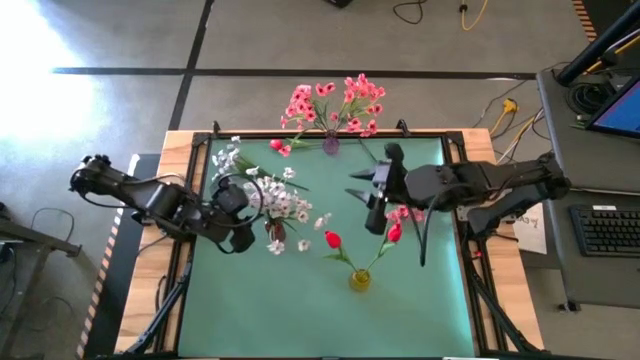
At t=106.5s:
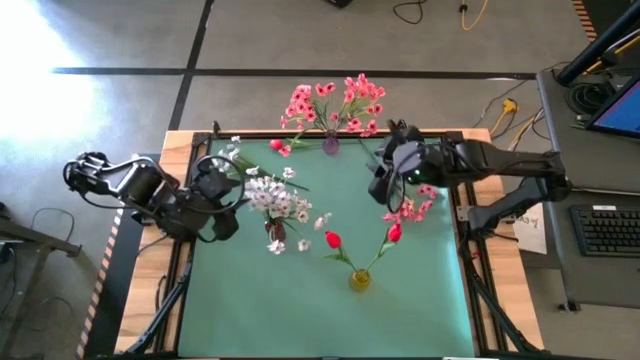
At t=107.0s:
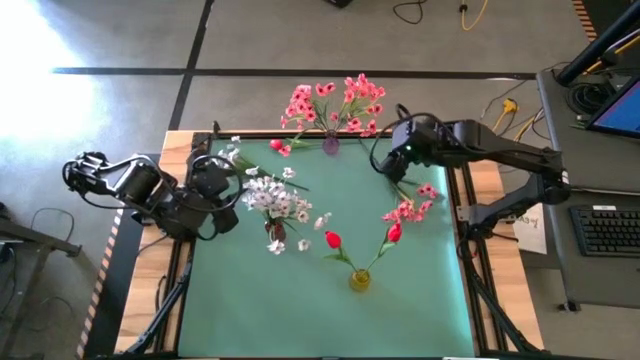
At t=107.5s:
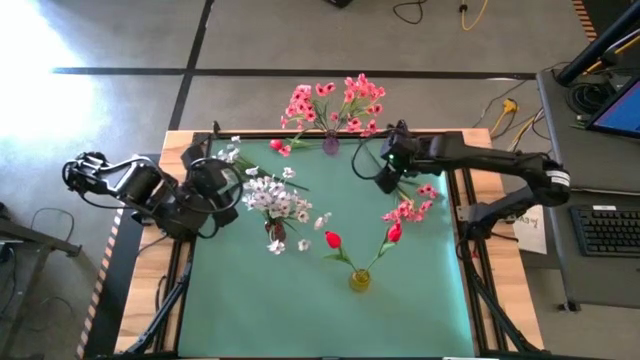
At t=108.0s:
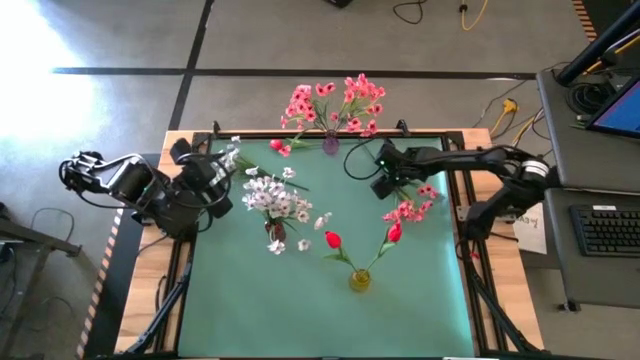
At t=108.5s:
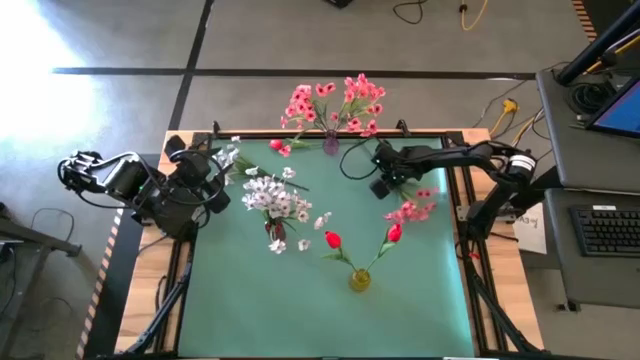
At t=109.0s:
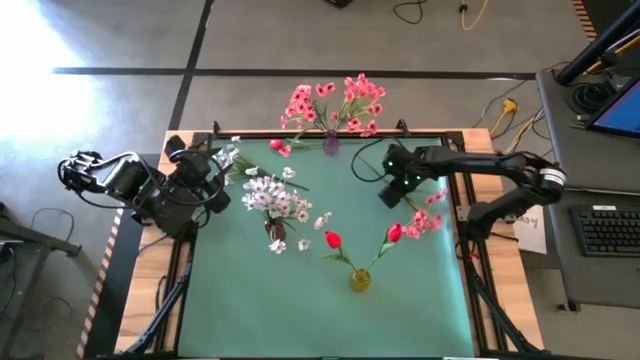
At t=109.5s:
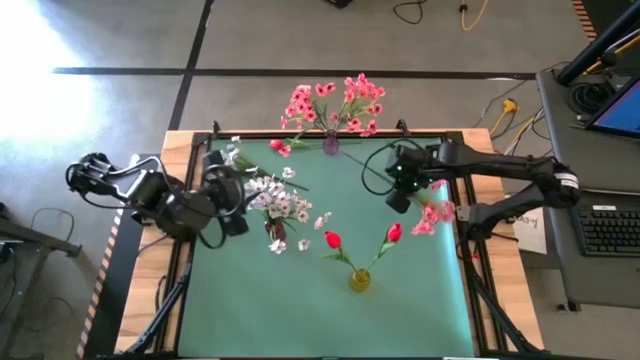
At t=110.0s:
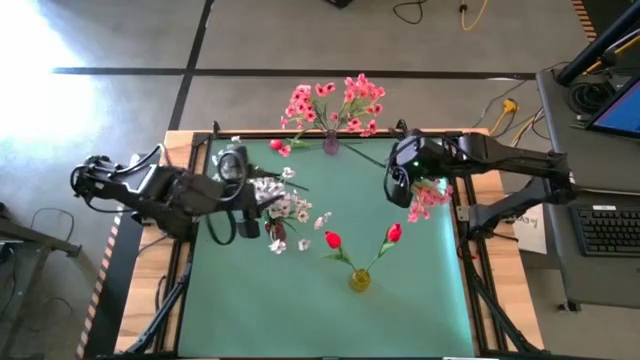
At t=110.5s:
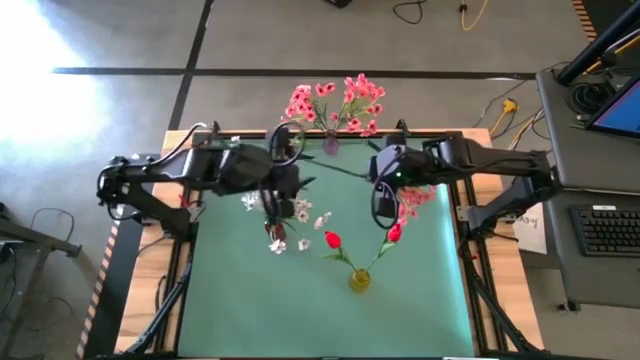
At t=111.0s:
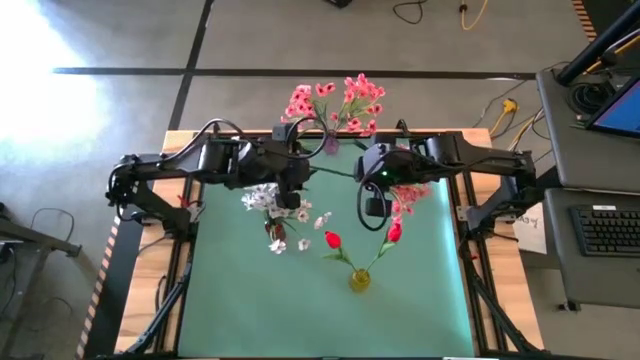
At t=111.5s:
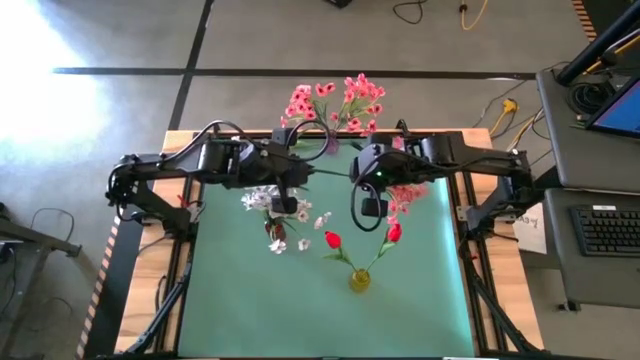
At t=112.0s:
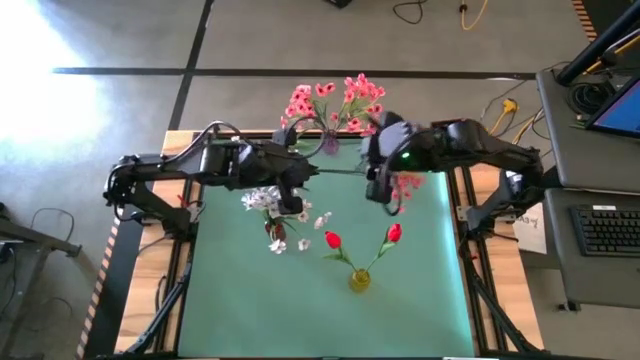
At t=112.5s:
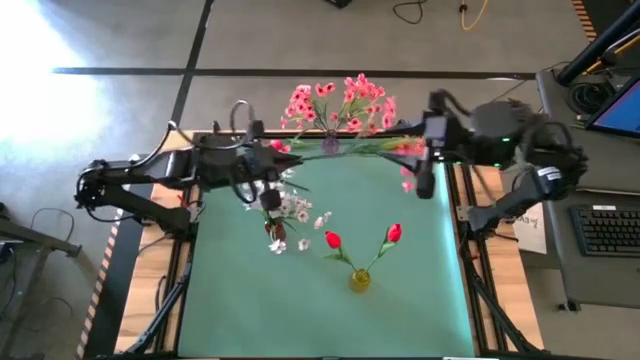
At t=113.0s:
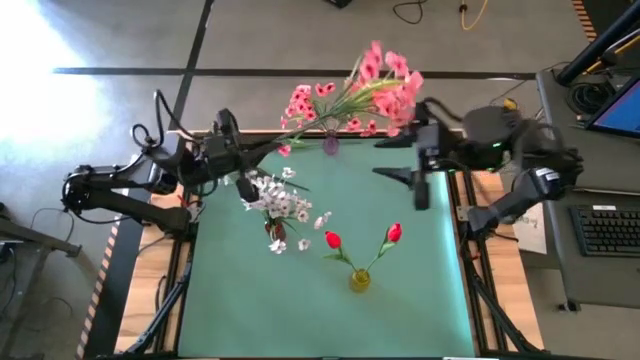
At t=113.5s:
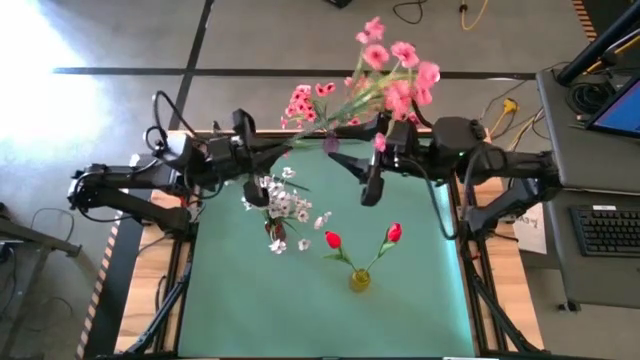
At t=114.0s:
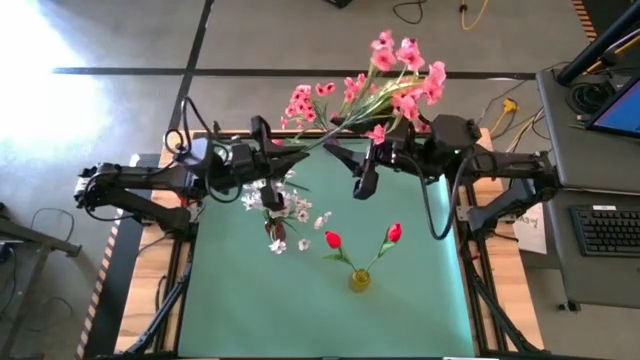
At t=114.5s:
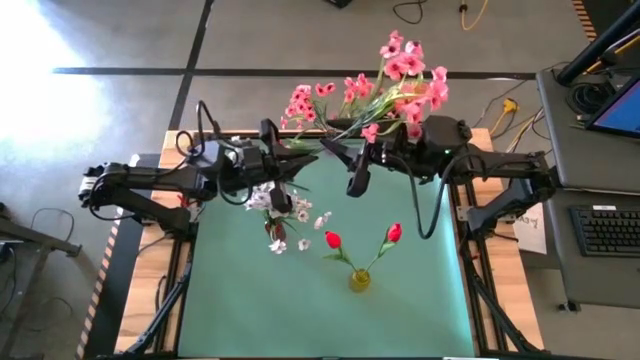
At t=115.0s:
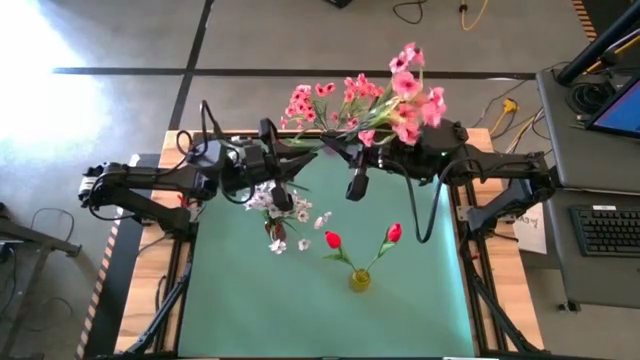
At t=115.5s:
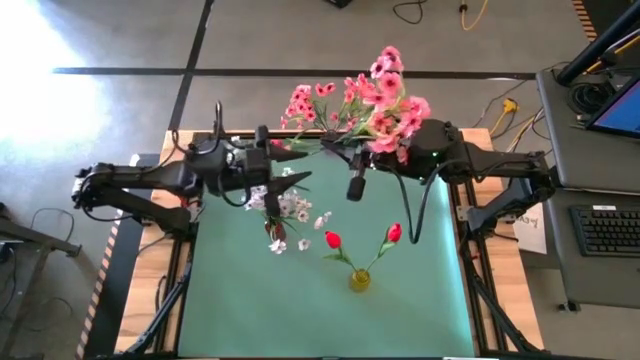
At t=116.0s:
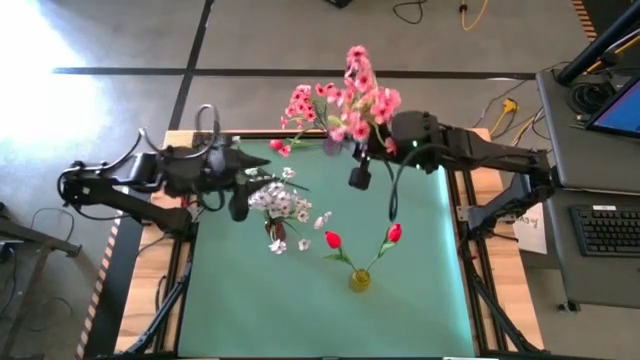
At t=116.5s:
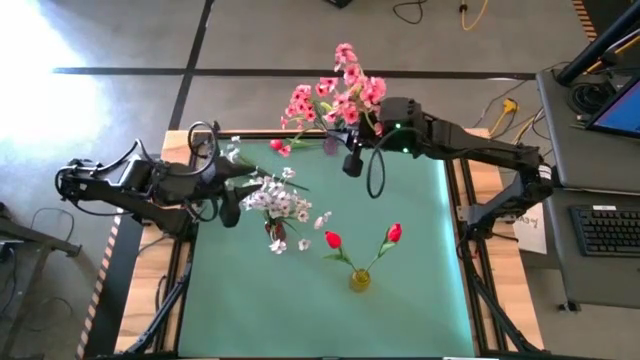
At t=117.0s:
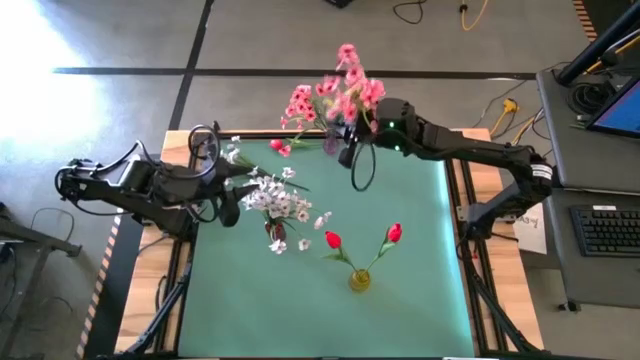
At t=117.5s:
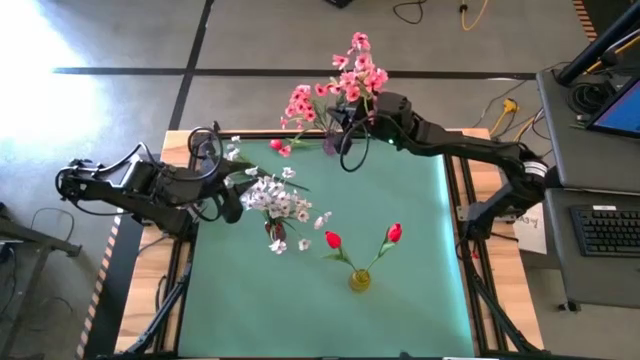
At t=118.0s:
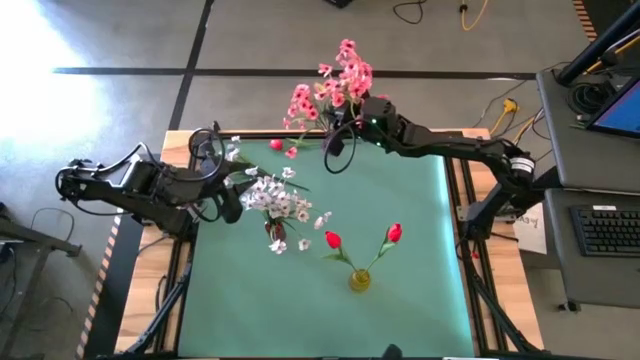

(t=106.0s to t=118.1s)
Task: Sort flowers into vase by color
Put the pink flower into the purple flower vase

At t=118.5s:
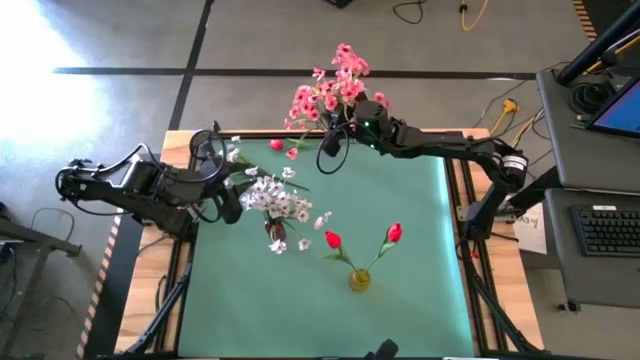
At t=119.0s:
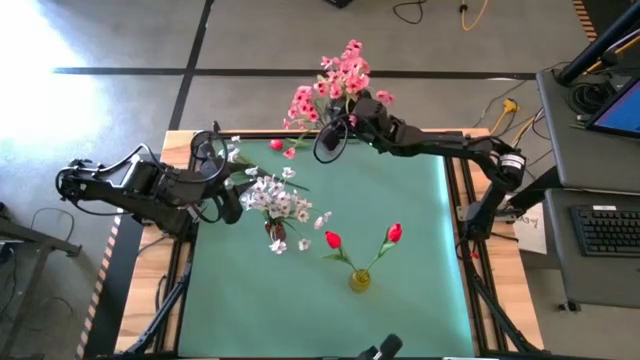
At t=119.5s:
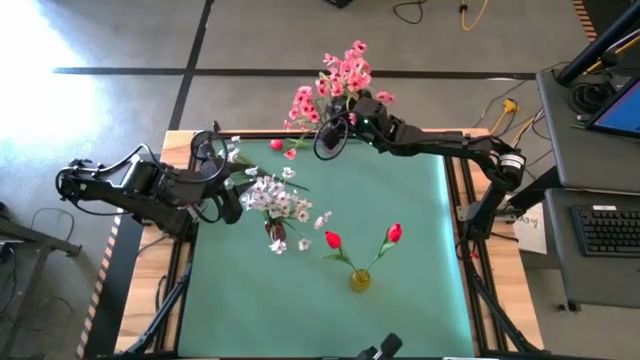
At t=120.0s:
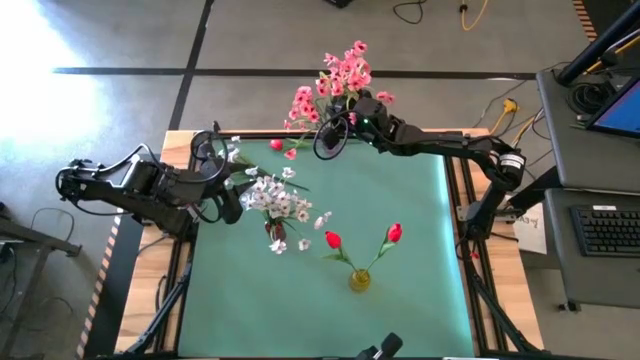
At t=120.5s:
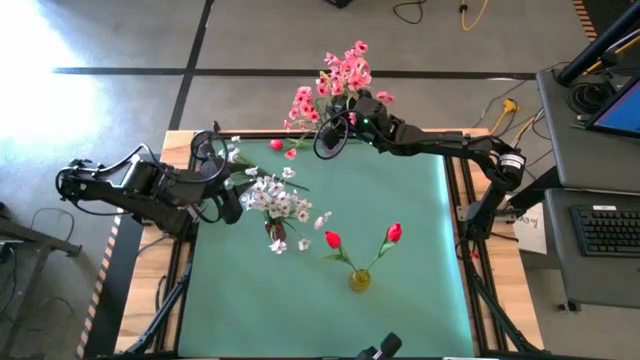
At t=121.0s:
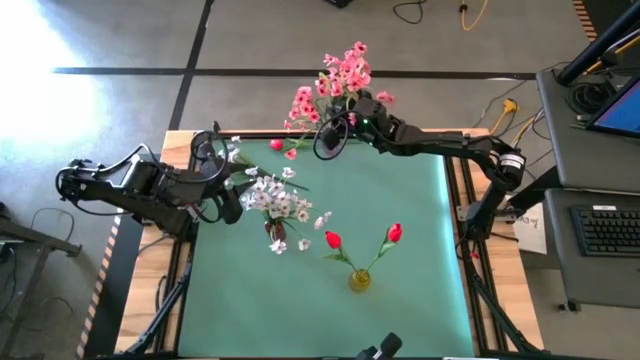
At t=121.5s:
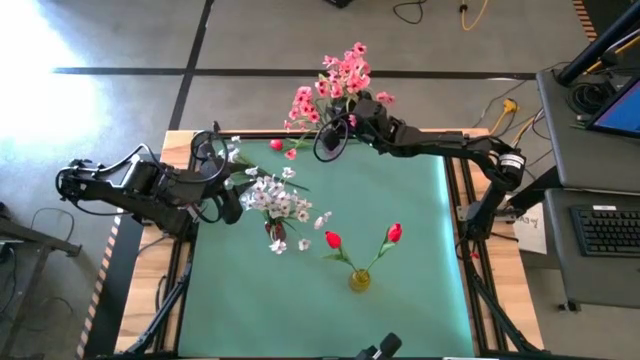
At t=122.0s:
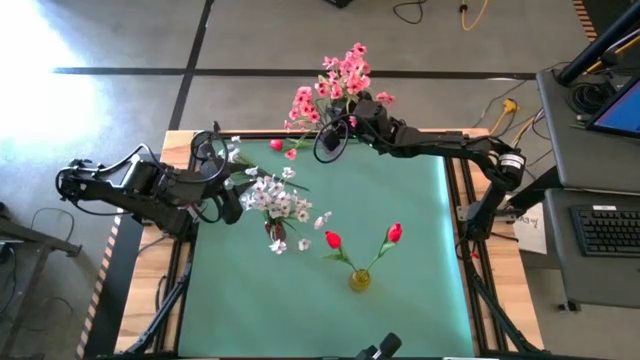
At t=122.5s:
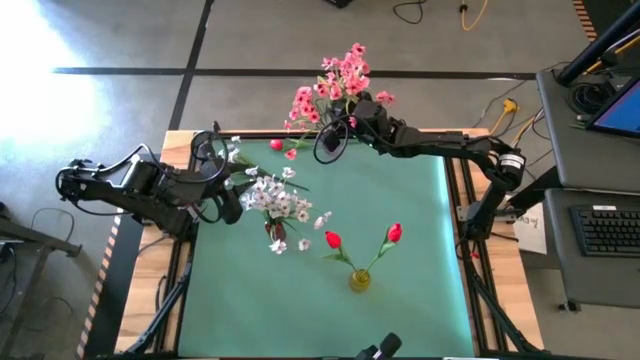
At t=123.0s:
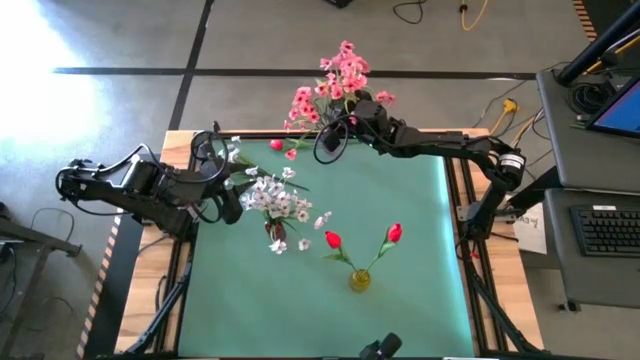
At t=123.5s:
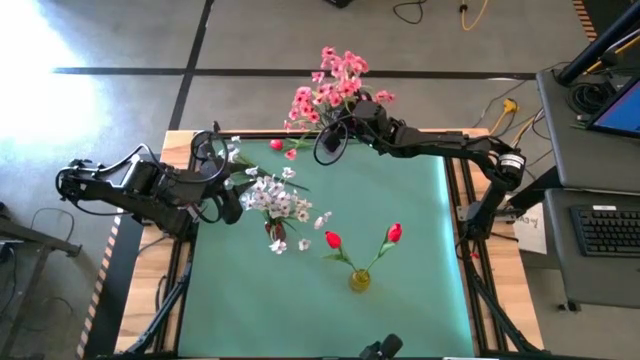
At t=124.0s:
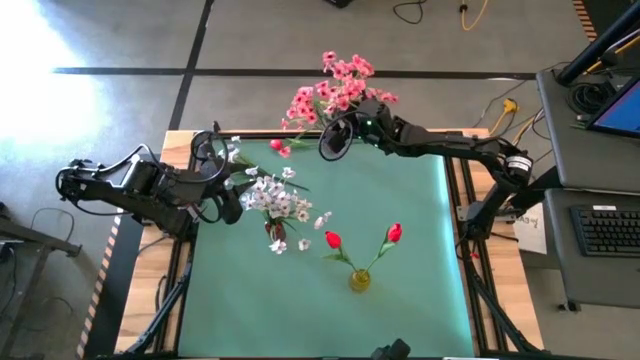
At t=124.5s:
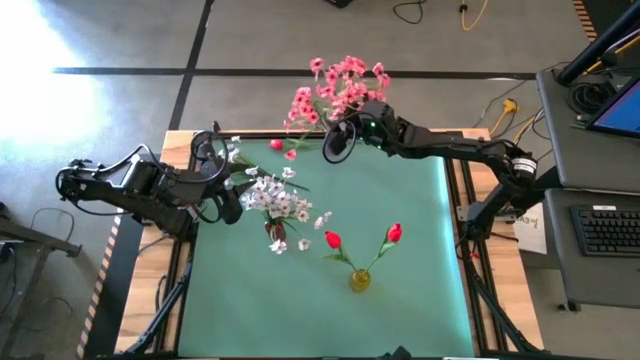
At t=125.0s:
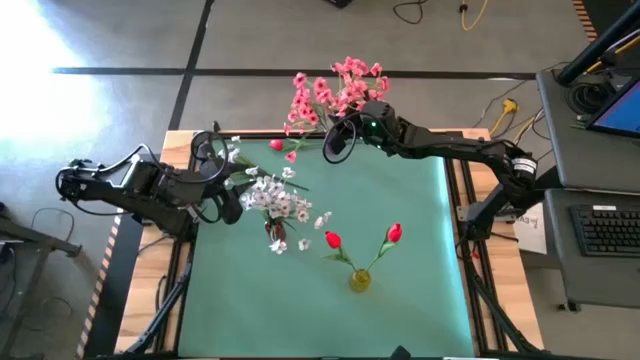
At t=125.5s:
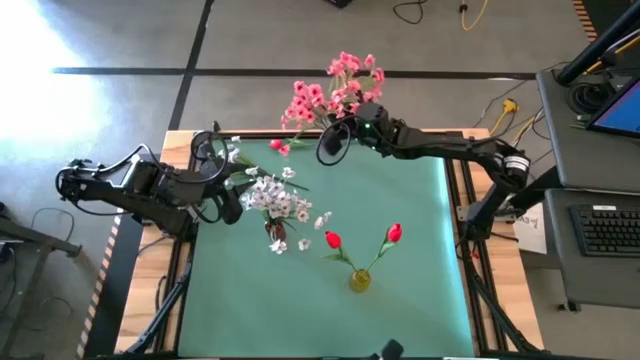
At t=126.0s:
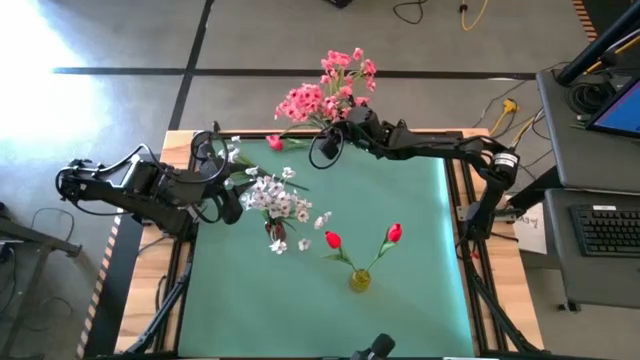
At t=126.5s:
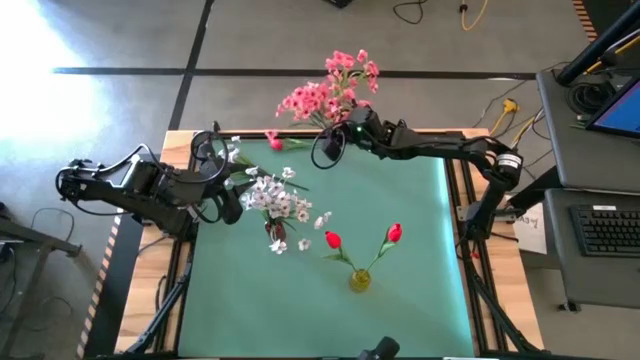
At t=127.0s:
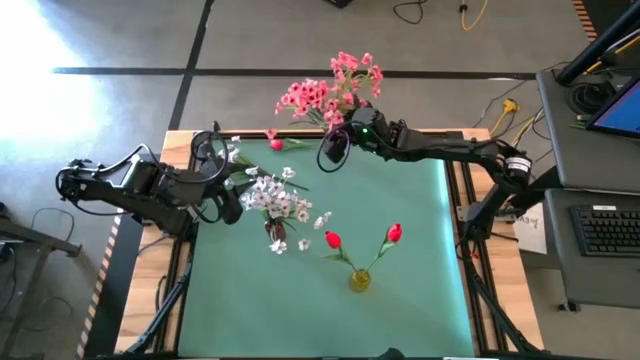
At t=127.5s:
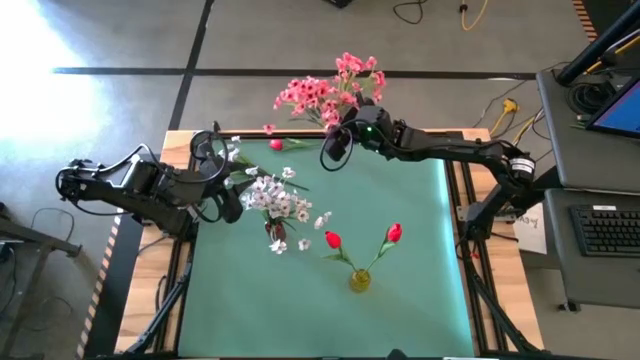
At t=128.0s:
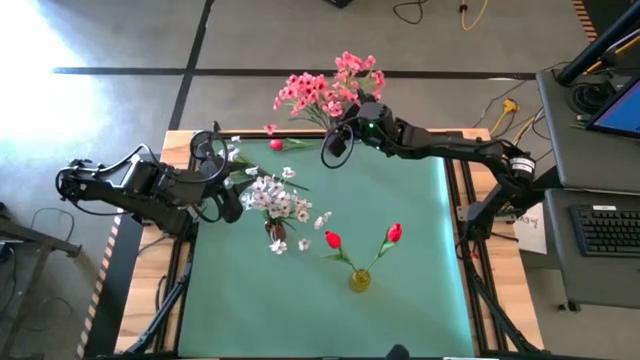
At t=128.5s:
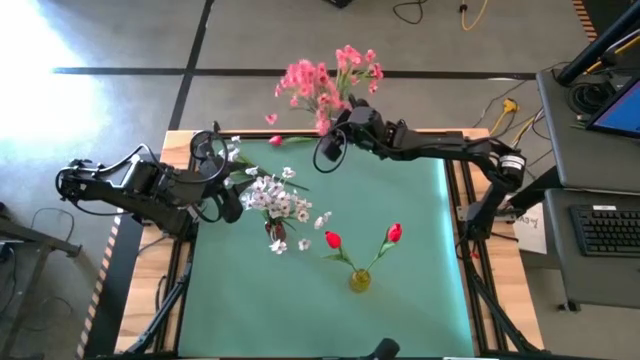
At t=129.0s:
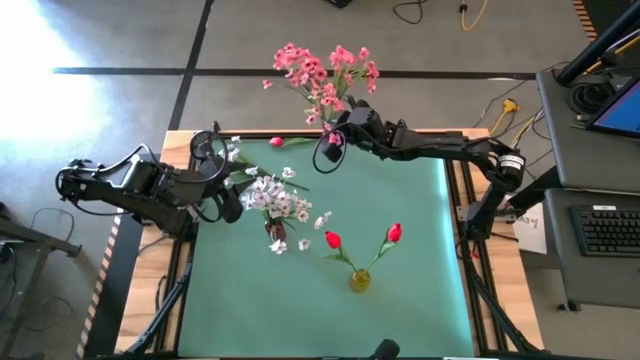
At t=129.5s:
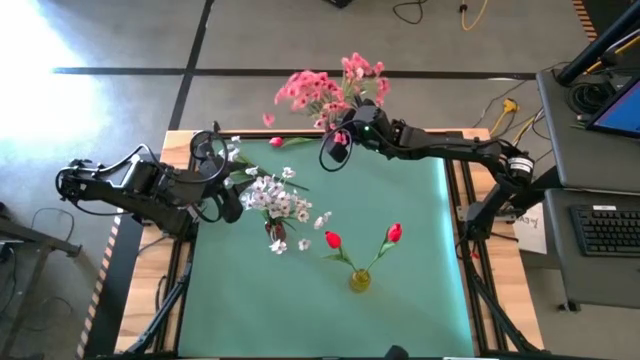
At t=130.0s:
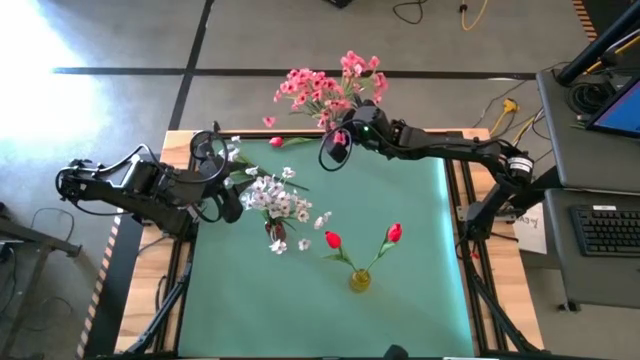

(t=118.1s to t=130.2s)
Put the pink flower into the purple flower vase
